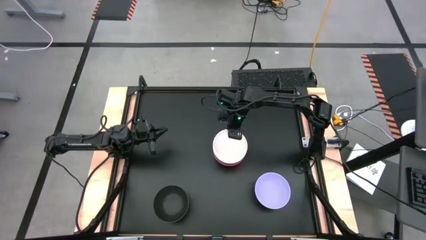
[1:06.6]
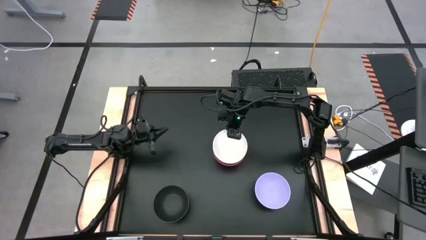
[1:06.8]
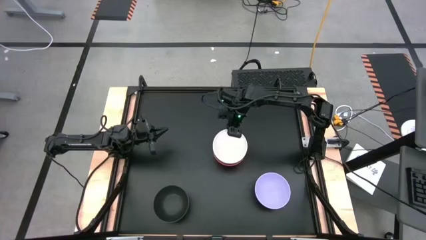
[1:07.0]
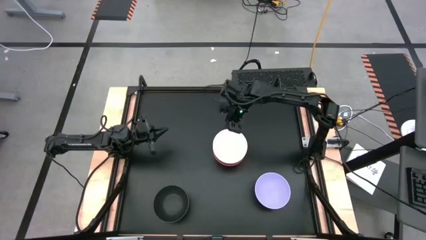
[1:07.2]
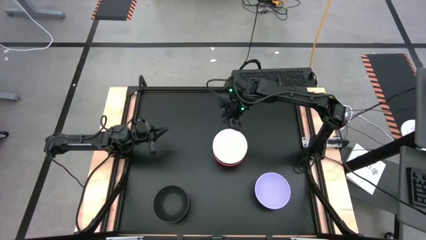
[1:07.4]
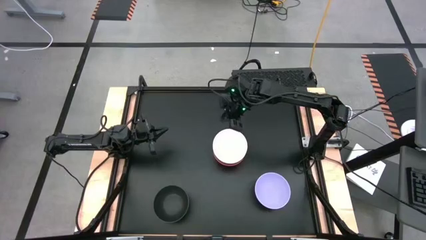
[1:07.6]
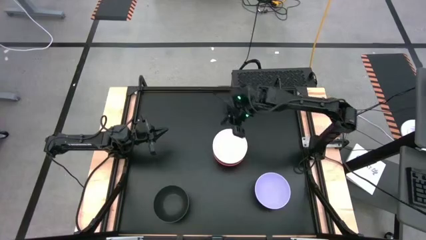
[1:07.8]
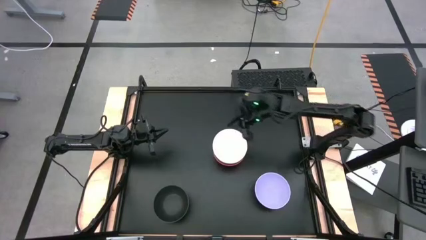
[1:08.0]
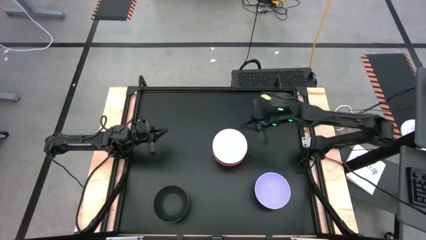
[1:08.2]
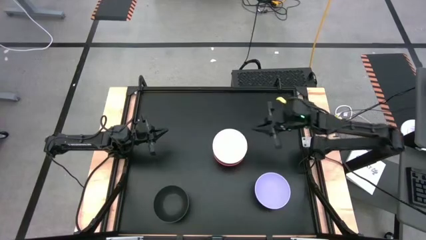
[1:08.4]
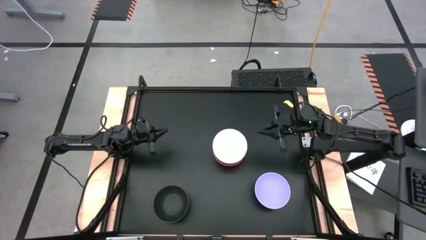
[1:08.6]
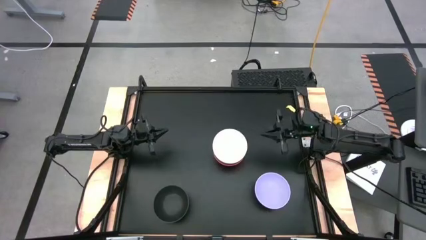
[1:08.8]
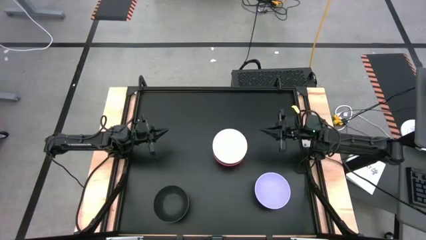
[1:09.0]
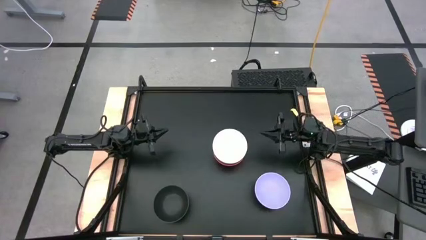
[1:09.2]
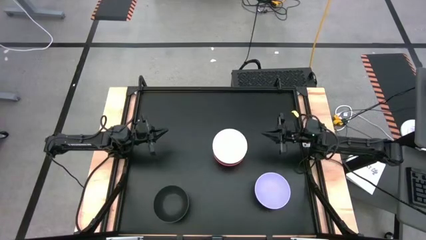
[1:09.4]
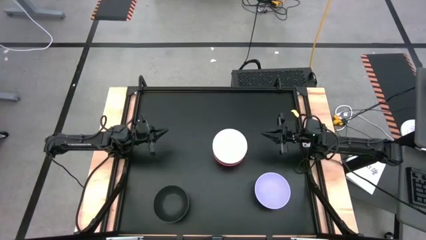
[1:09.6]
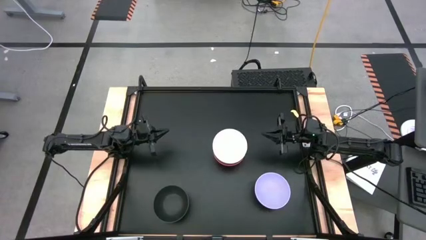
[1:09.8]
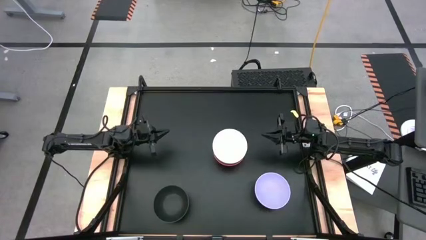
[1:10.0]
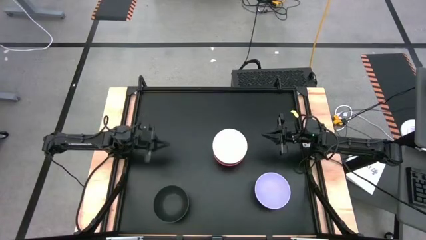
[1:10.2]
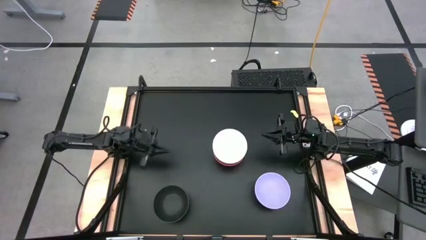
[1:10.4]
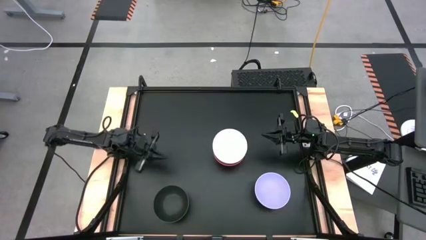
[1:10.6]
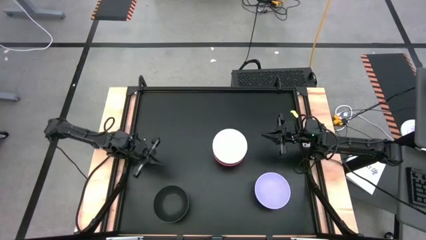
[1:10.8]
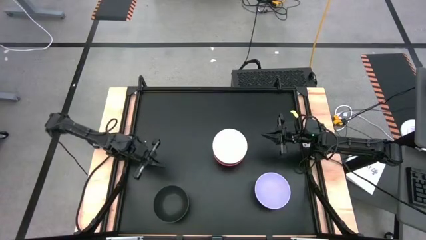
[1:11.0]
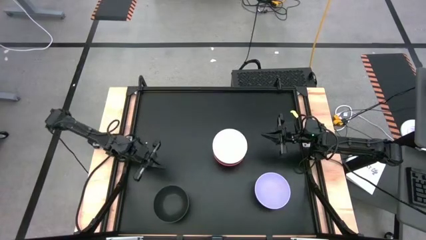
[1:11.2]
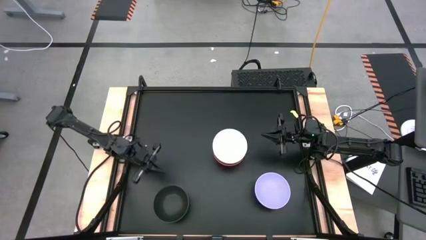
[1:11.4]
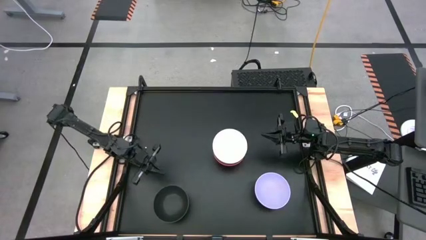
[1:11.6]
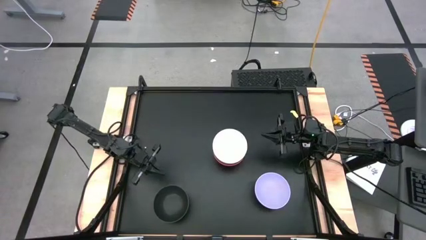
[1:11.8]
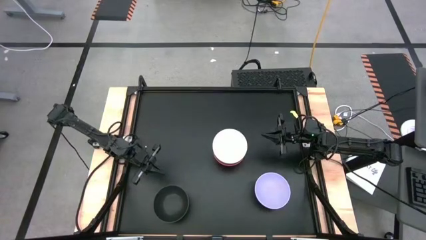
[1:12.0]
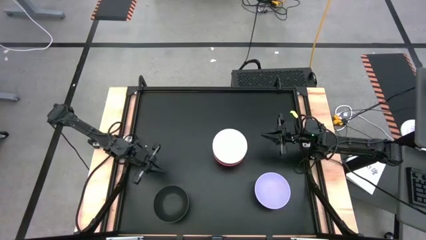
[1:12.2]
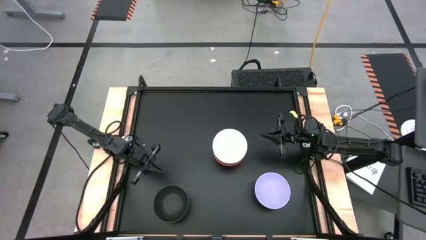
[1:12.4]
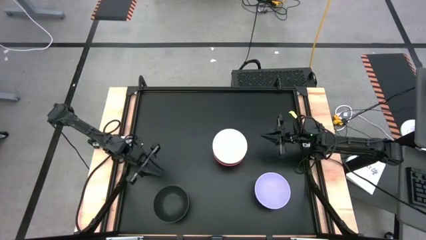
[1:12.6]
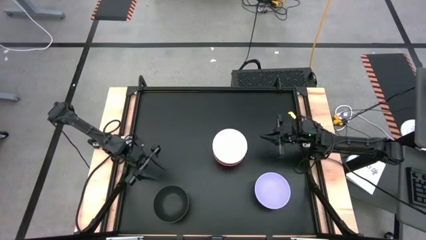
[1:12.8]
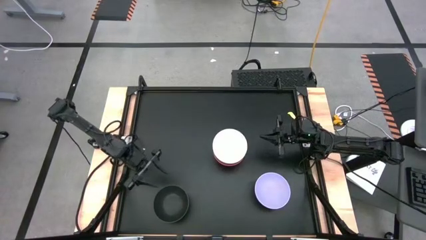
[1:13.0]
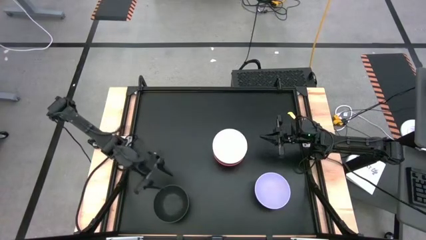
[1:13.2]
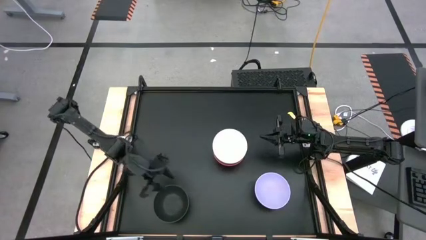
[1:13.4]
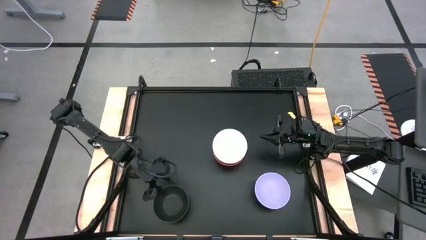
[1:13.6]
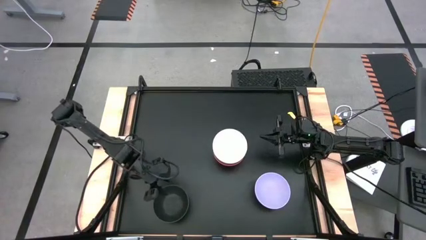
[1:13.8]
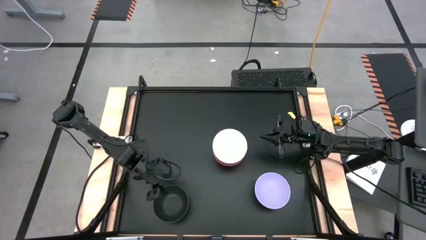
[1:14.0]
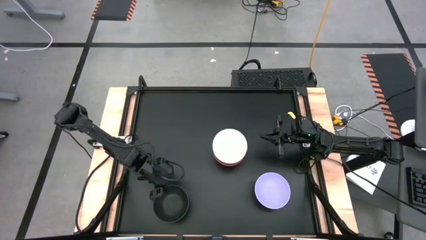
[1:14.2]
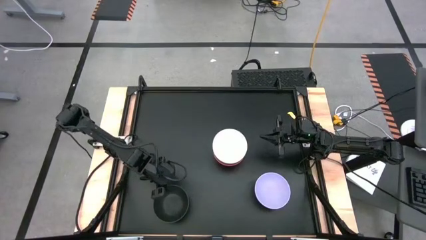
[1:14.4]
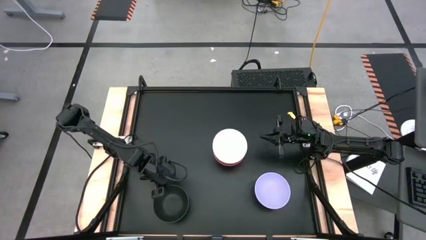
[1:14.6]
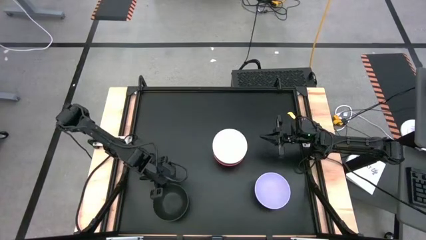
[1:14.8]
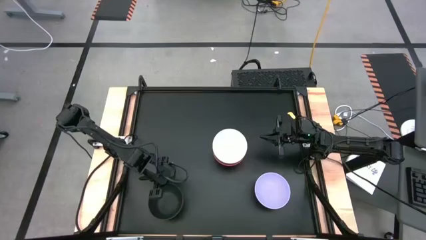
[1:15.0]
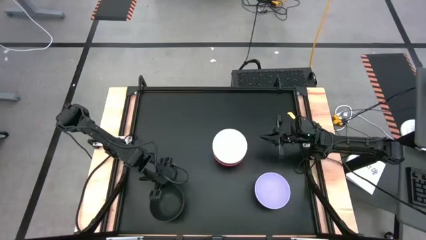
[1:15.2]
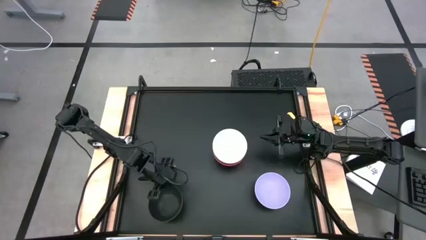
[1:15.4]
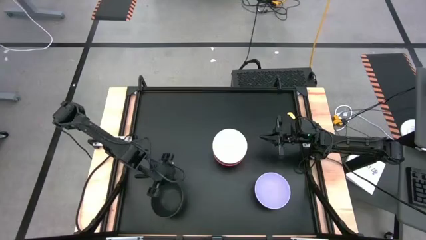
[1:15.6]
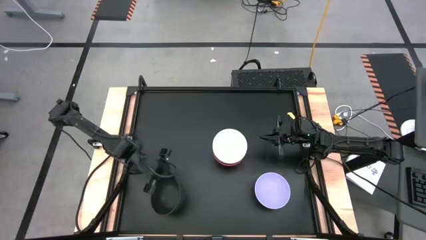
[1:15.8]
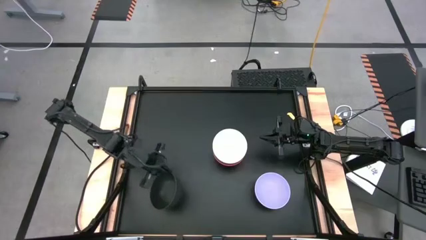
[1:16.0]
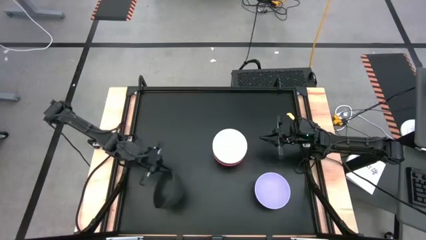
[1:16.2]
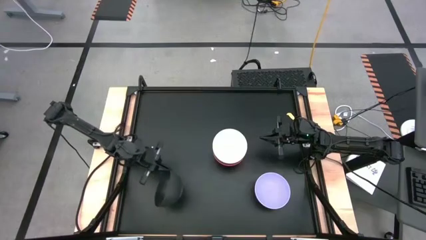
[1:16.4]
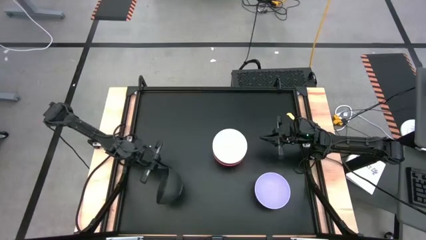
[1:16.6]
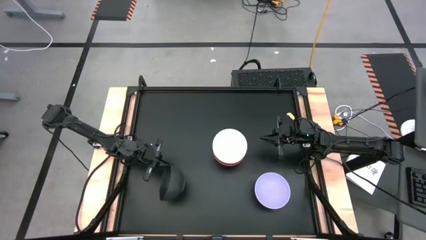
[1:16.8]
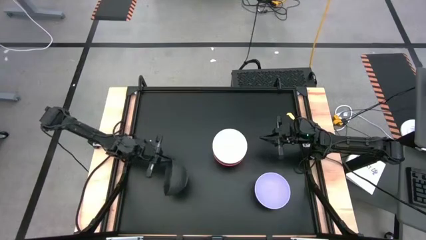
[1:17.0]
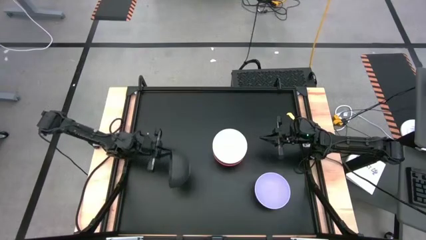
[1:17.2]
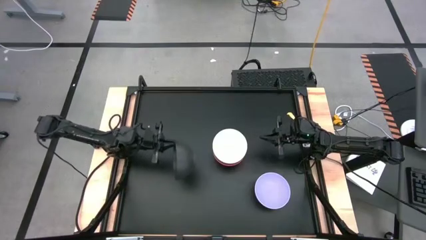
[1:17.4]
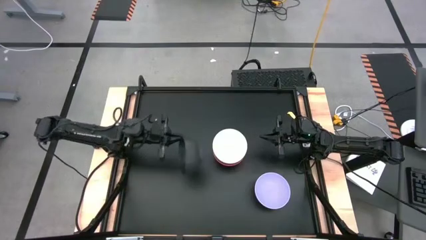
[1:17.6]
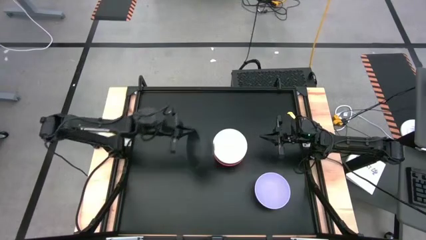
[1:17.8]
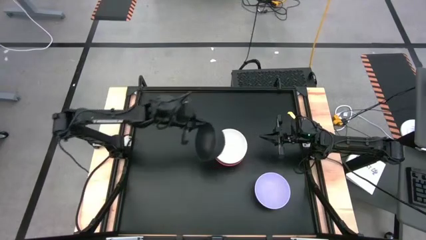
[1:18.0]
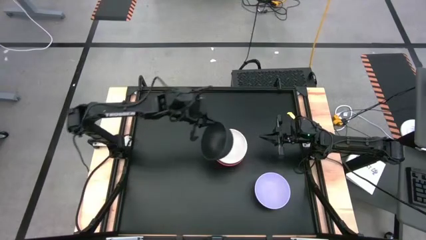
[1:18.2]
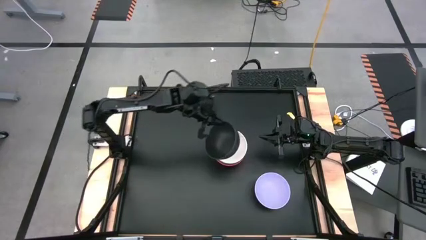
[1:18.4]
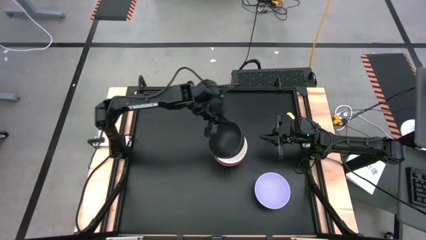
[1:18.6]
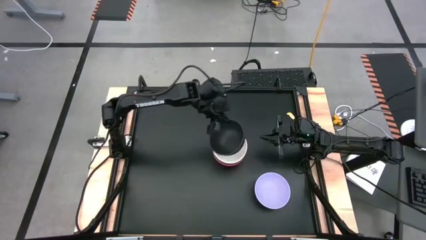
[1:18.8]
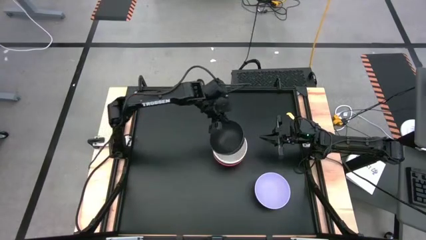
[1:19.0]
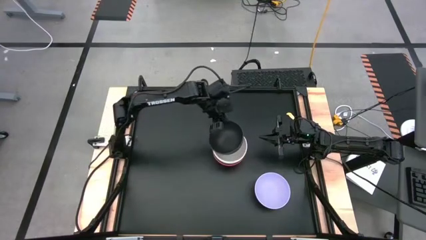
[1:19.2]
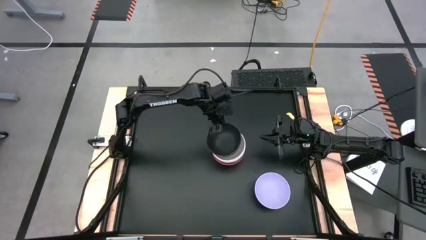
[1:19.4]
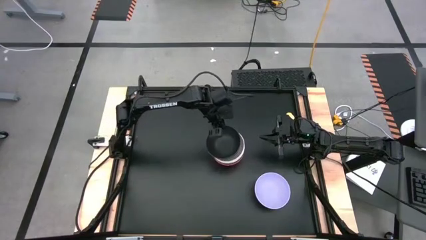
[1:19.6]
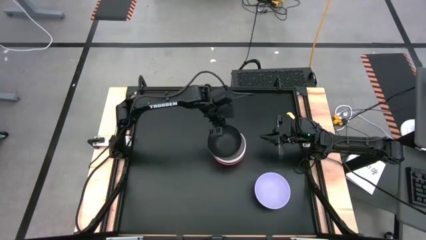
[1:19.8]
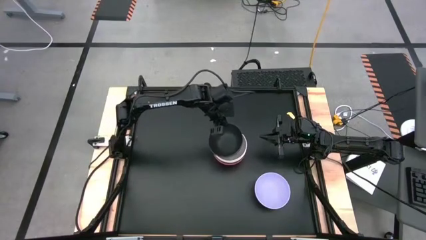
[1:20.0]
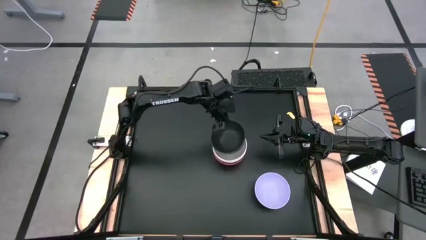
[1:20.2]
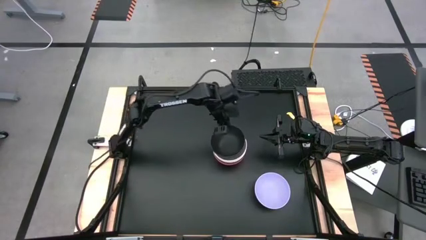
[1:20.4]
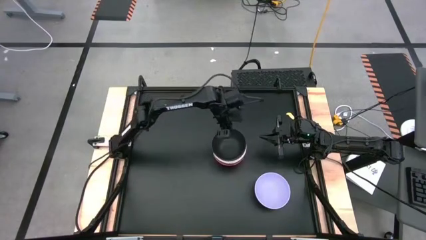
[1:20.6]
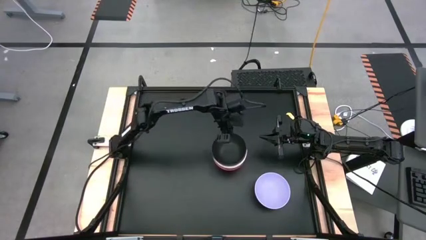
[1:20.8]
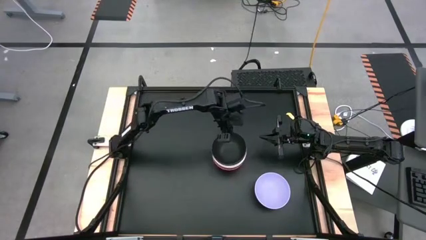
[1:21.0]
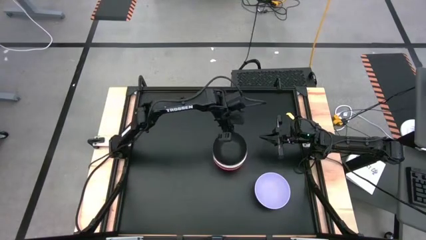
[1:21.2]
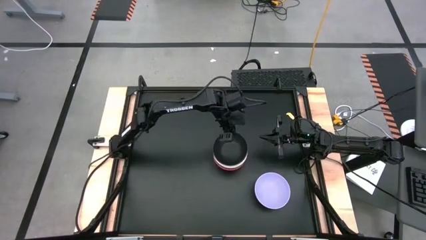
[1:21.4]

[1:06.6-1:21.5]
Task: Nest bowls inside each other
Stack the black bowl on top of the white bowl

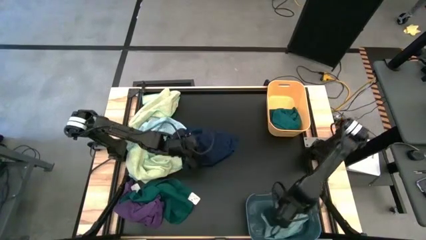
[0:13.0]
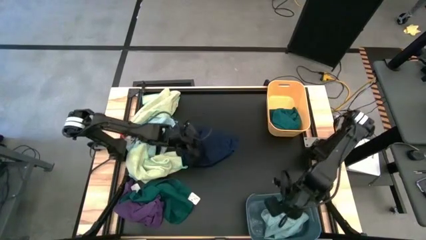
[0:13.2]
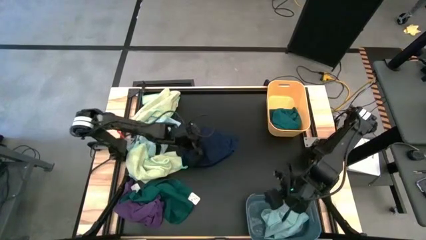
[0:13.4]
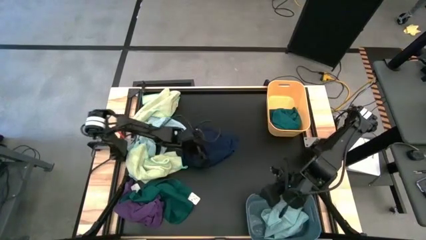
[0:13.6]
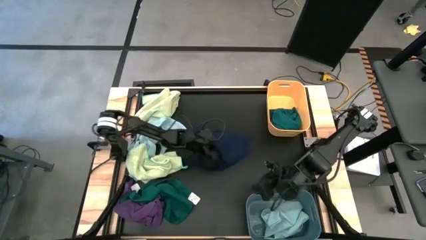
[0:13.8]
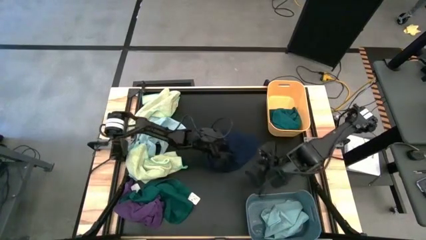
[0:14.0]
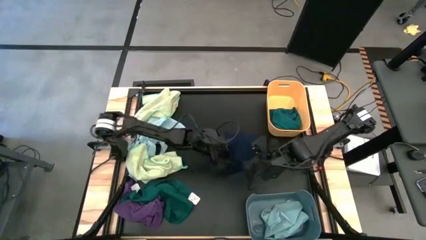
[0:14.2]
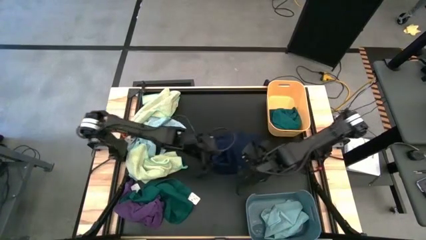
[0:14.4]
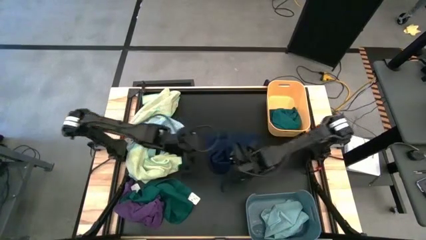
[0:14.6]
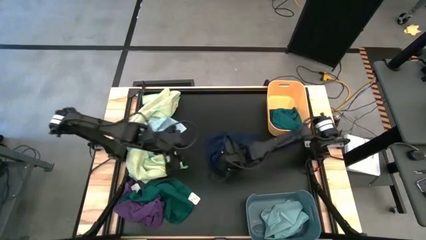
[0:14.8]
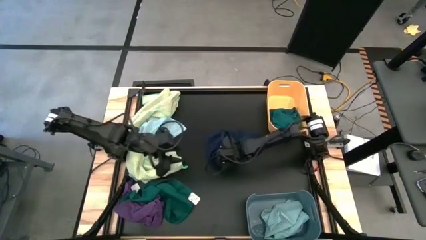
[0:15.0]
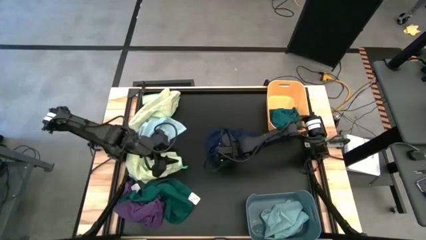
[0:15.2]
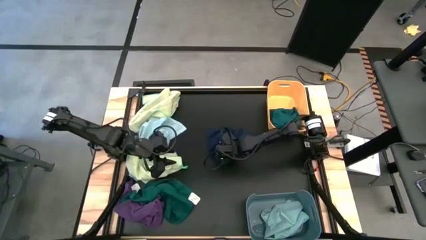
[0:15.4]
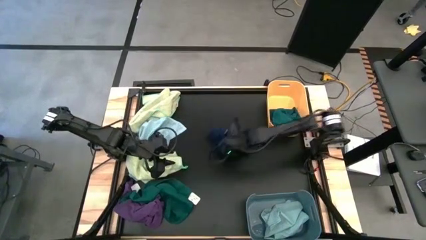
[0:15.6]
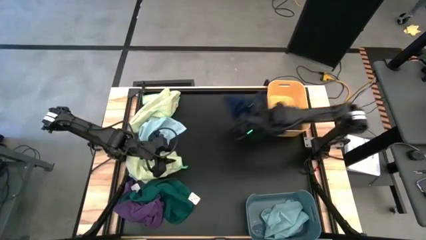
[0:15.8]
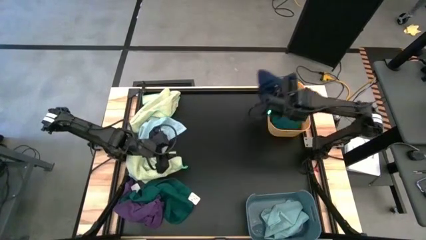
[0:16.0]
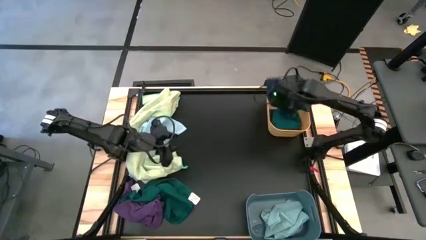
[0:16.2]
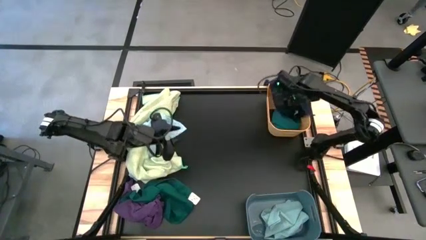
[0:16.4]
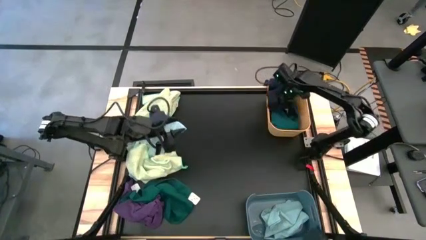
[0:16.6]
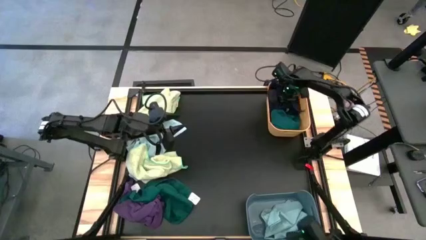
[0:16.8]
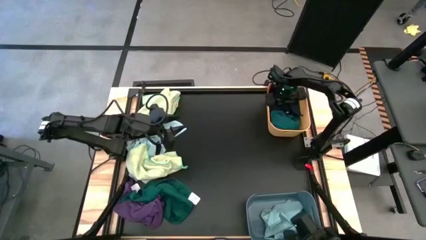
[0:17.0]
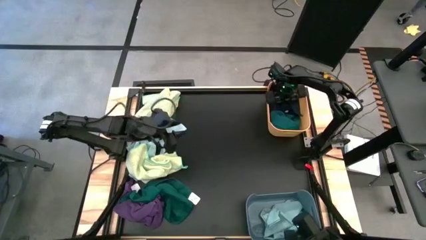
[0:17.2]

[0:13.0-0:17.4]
Task: Sort towels by color in basket
Put the blue towel into the yellow bin
